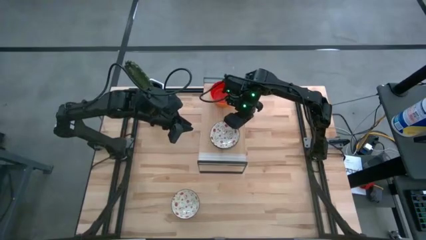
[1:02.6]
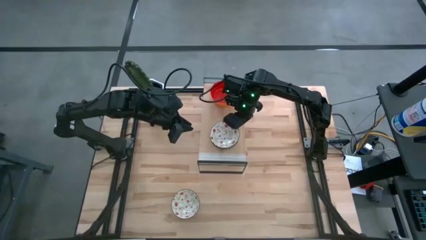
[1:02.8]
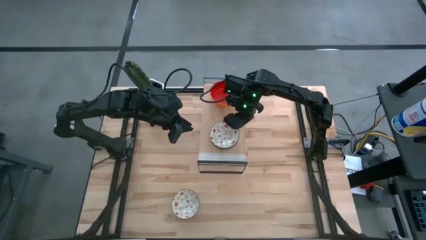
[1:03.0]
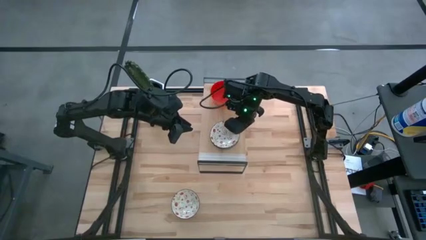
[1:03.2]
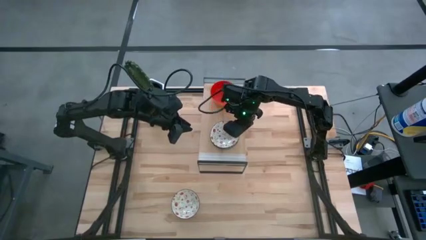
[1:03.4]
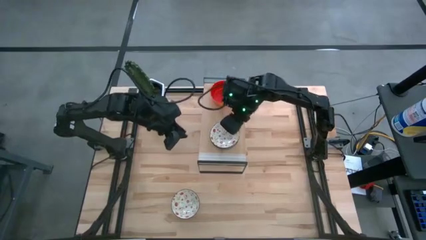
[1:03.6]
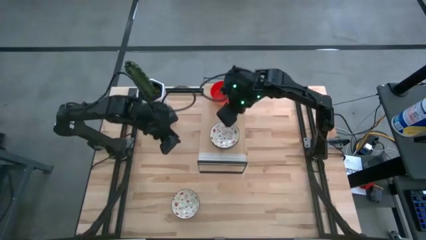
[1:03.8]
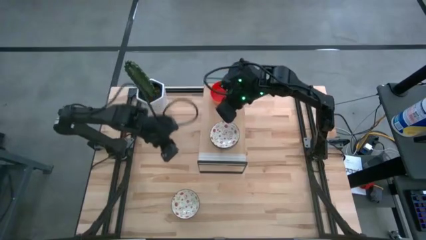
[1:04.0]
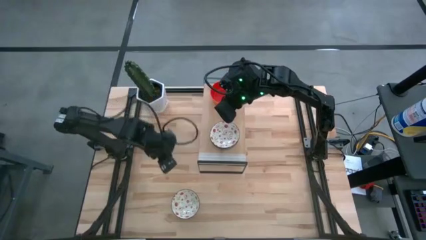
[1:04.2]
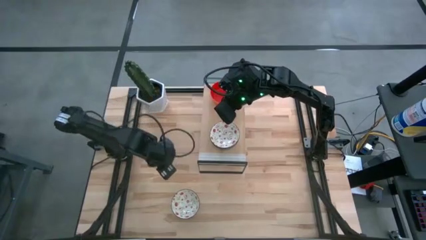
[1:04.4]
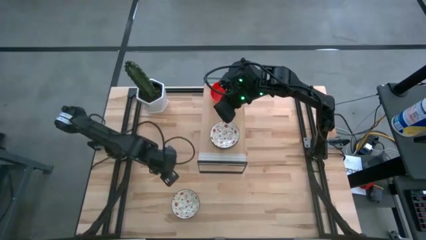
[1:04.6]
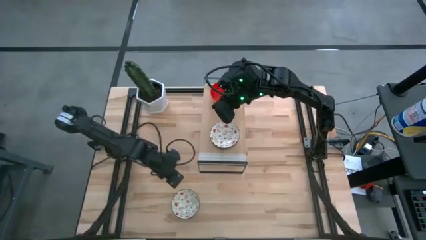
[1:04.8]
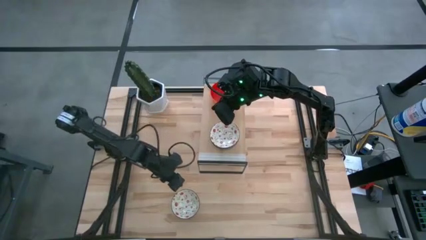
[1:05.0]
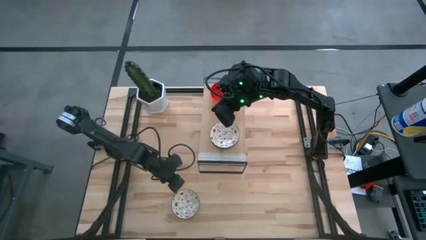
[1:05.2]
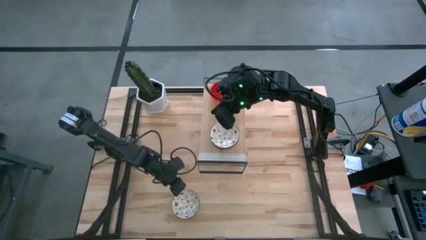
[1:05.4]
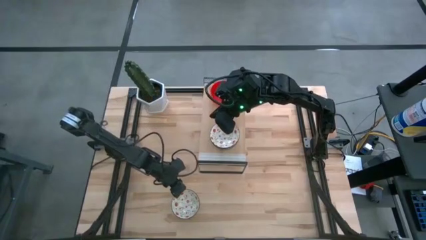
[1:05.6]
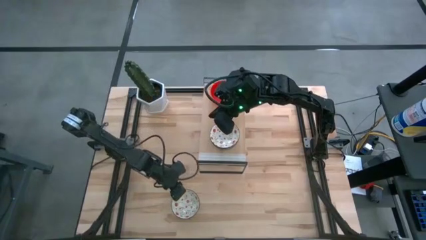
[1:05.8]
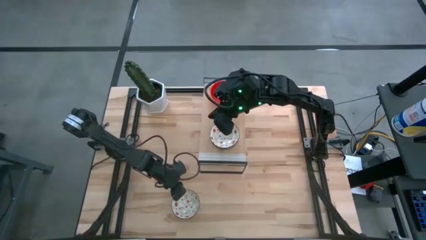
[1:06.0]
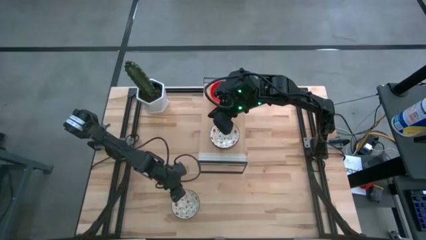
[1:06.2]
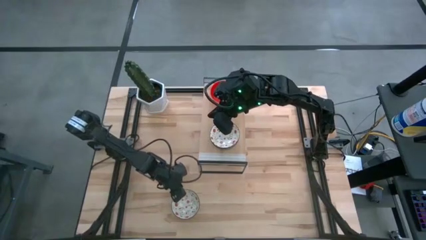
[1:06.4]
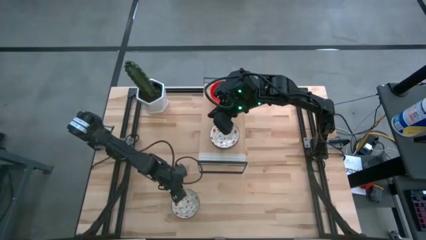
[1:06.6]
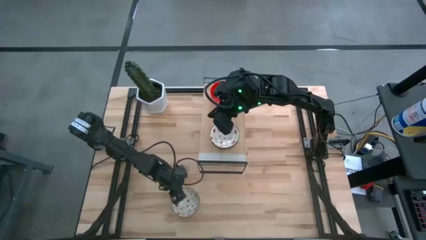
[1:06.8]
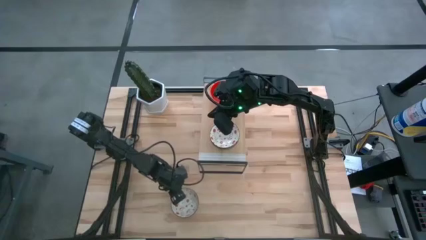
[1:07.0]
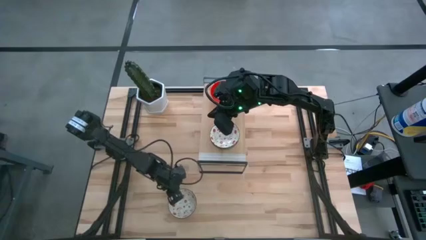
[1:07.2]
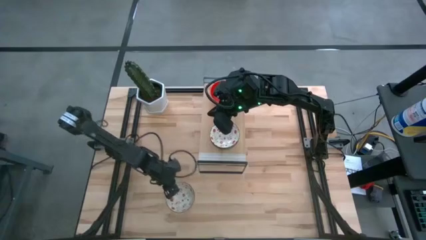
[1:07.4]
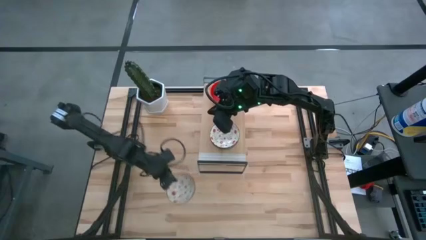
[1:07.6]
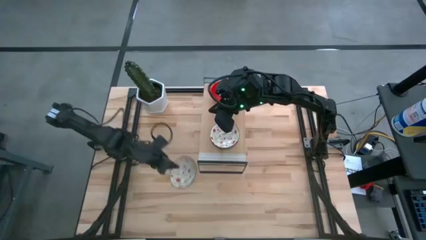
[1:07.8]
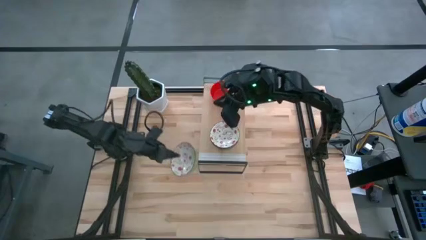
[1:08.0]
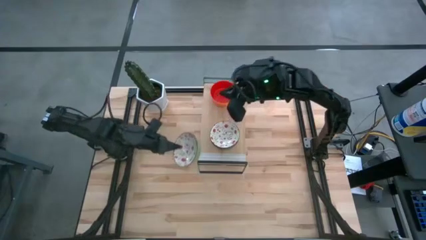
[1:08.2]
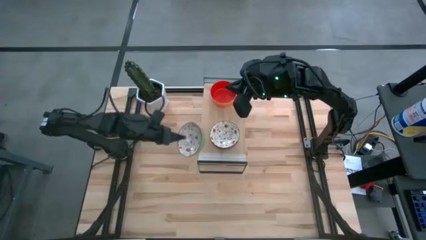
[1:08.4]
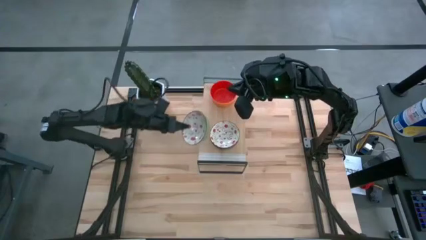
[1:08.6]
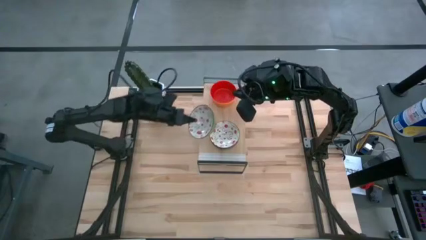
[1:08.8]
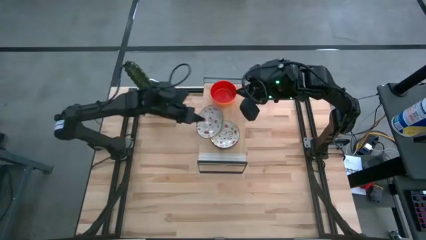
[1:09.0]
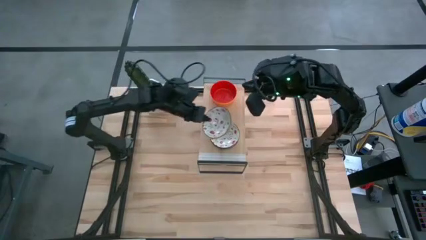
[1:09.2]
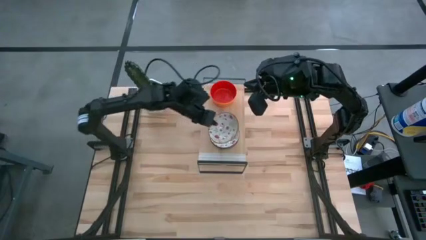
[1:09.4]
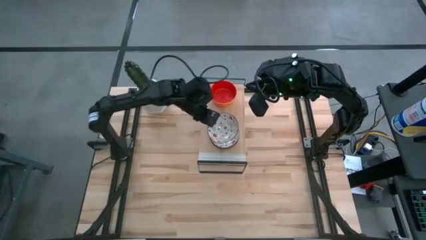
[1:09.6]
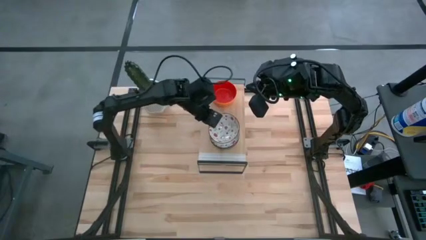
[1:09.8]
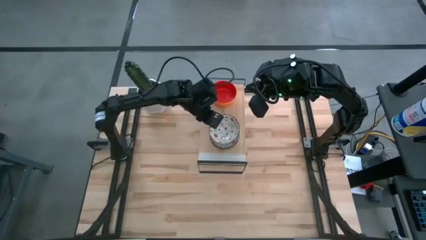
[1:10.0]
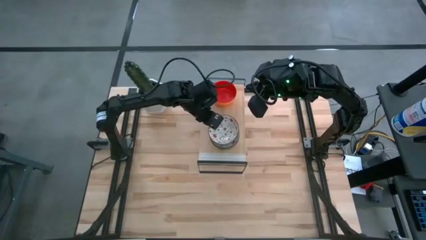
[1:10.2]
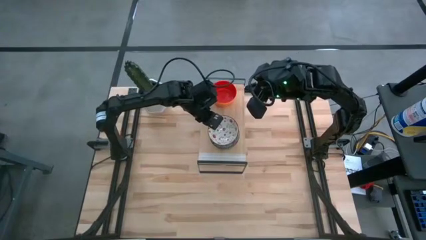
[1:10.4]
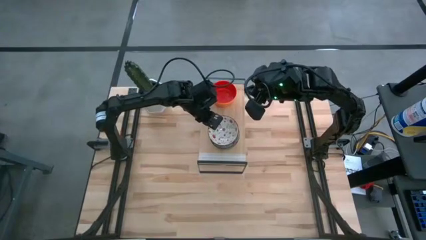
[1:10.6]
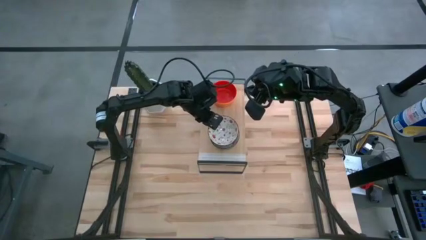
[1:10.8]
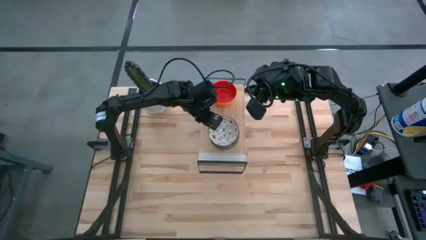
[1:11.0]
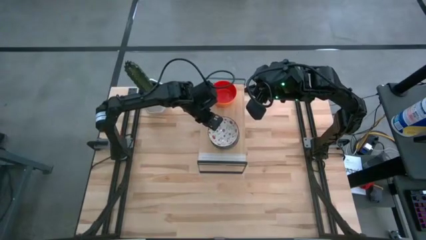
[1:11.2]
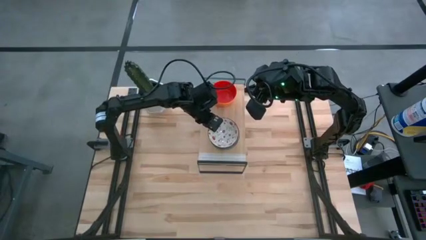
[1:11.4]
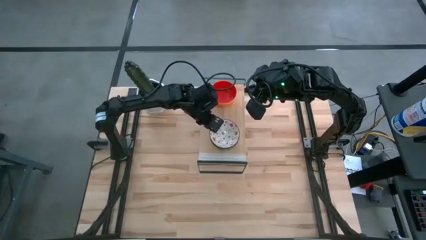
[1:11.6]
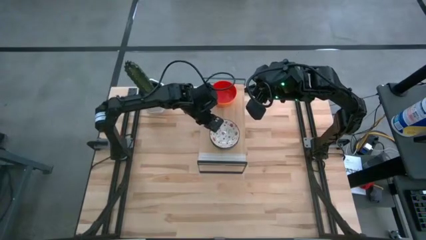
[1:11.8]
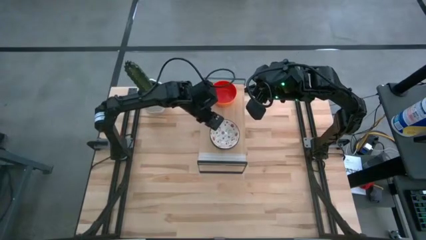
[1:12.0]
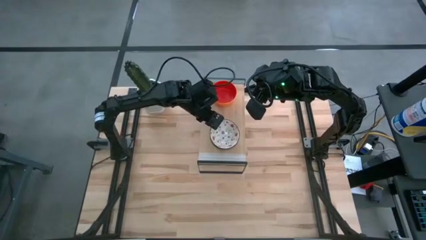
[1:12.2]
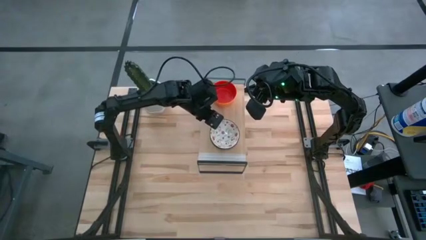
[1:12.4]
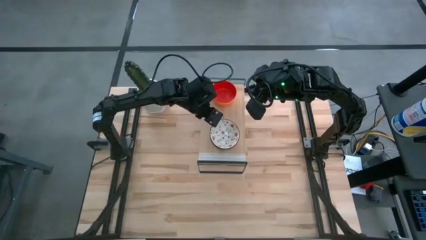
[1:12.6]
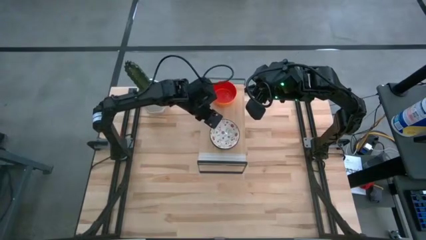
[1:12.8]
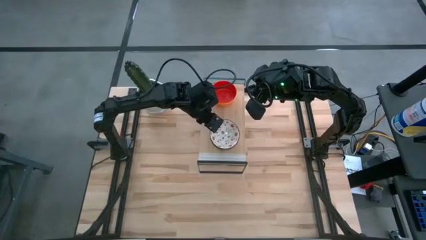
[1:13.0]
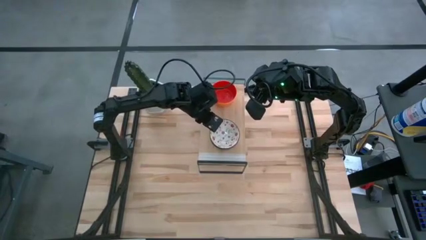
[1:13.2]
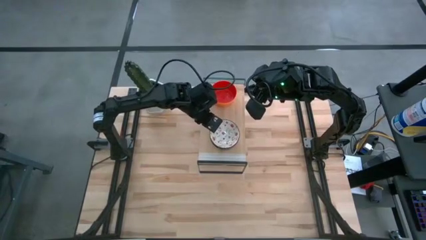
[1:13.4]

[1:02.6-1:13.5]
Task: Pick & Place Mini bowls
Stack the white patterned bowl on the stacked white patterned bowls on the shelf

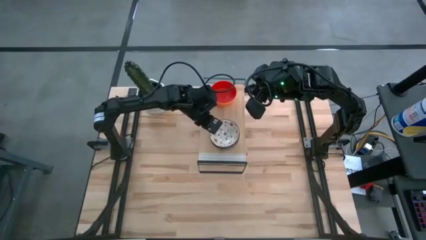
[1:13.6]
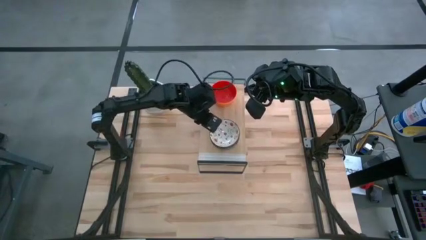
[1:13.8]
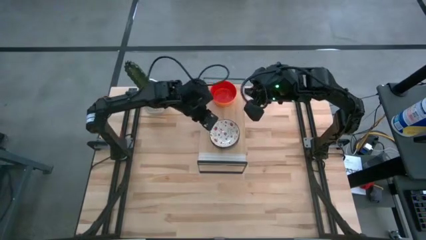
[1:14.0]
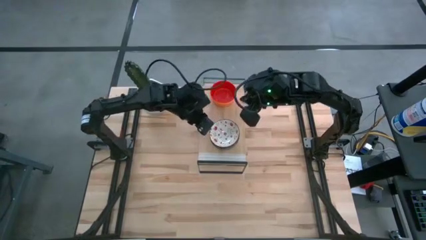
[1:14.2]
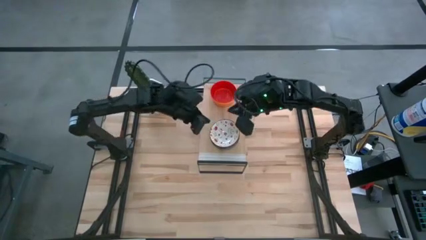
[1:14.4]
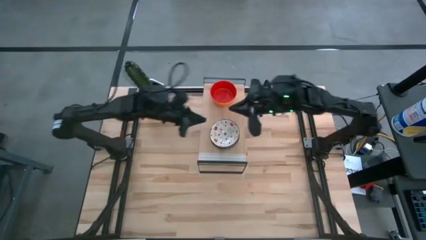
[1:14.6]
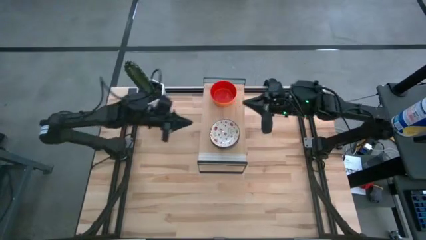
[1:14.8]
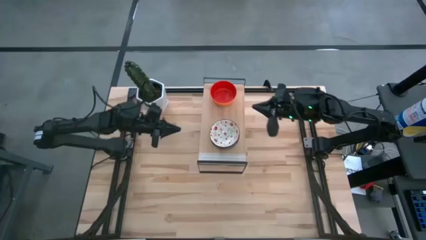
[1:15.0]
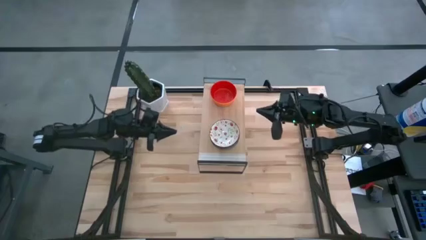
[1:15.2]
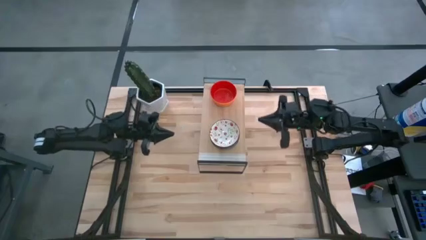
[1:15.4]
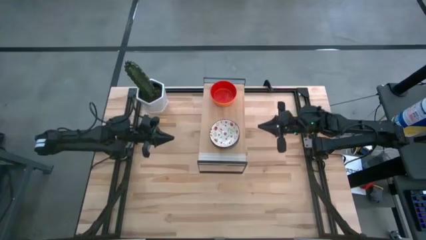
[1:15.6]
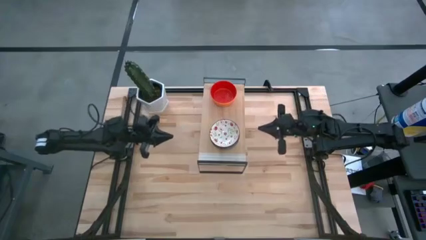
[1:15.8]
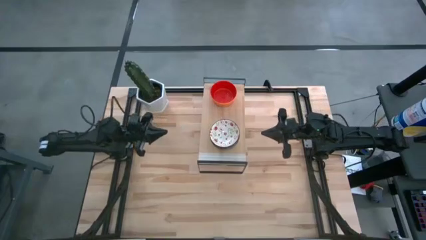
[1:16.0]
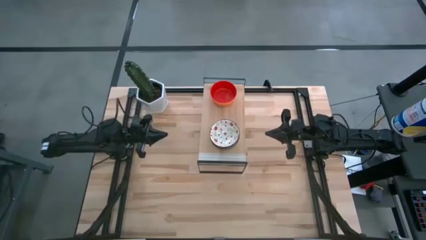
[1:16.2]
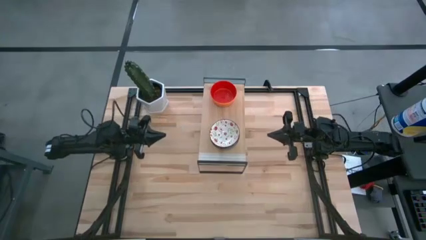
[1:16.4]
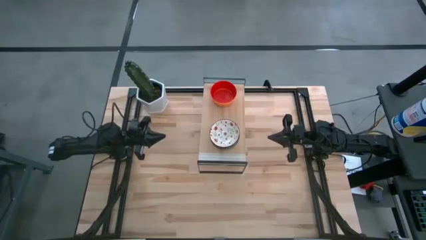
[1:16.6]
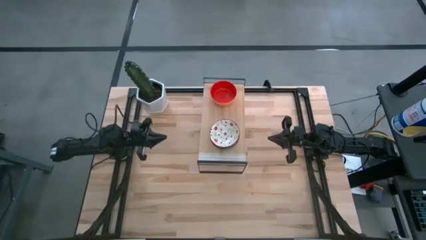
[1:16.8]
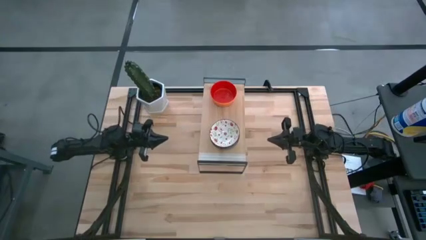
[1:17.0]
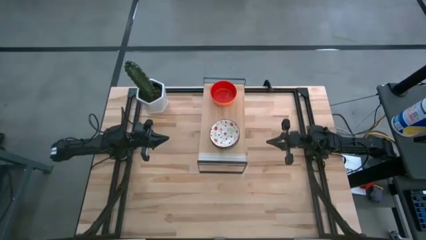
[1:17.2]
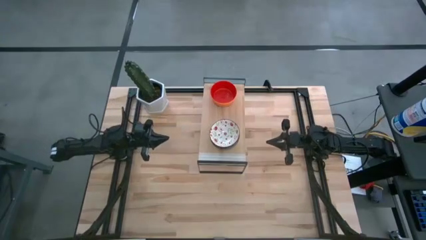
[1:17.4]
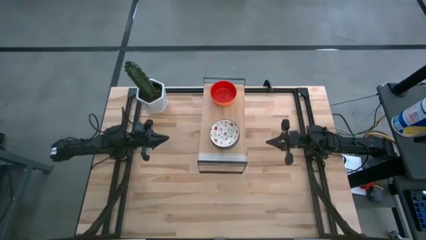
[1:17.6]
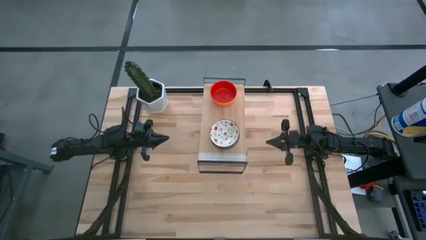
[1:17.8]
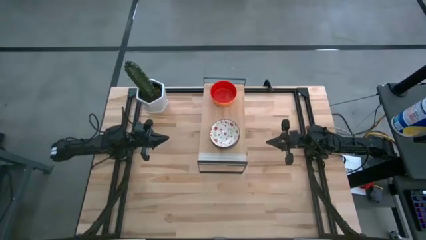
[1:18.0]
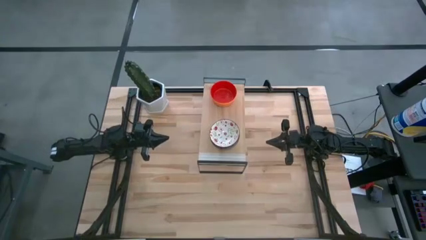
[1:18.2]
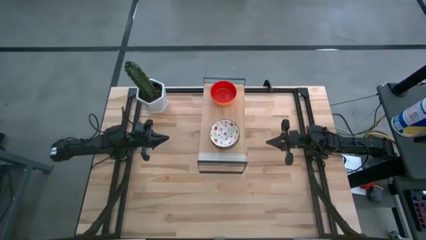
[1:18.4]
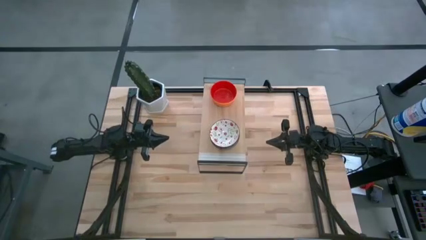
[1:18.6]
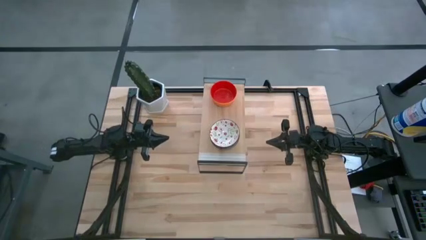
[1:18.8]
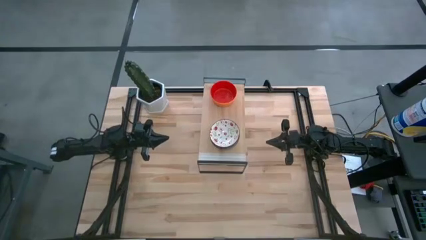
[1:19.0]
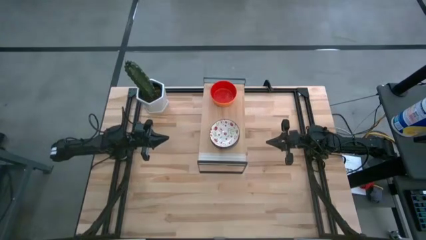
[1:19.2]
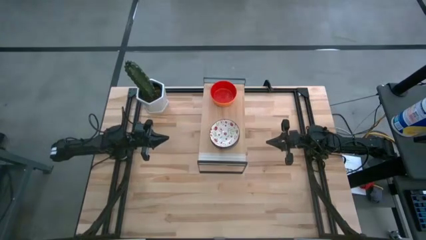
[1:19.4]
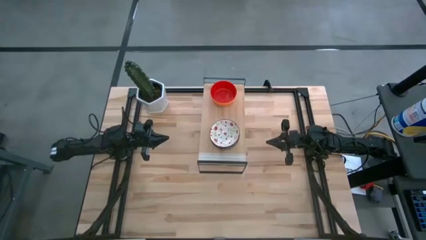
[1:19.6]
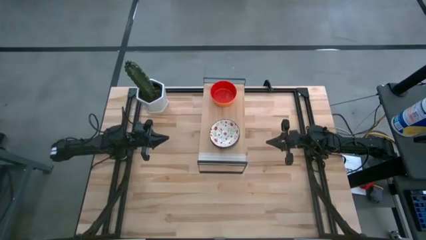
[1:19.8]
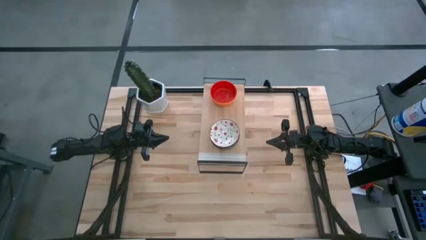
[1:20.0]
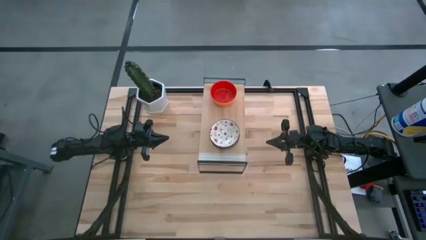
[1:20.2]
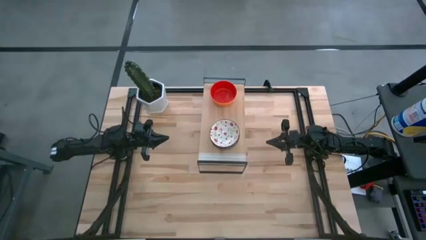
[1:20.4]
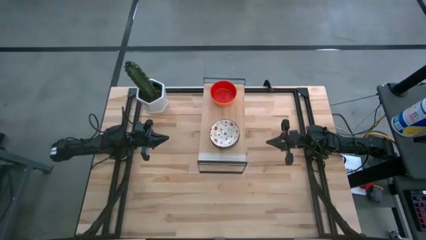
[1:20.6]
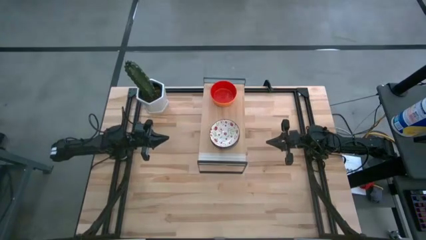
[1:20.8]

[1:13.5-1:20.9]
Return to Home Position
